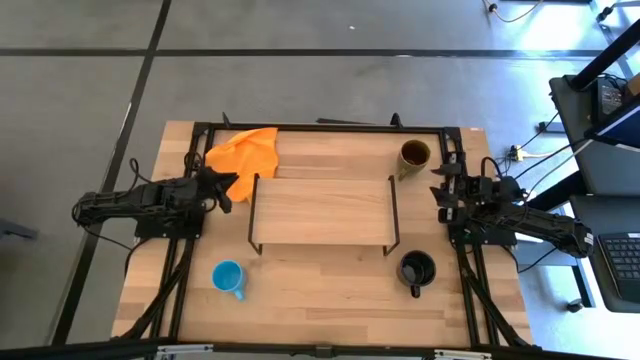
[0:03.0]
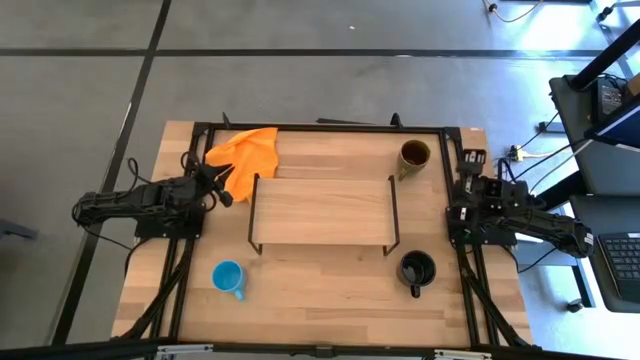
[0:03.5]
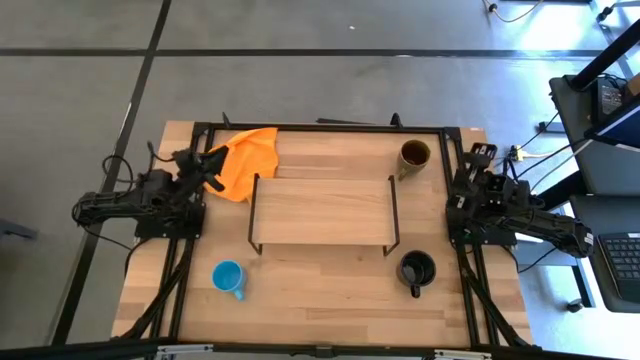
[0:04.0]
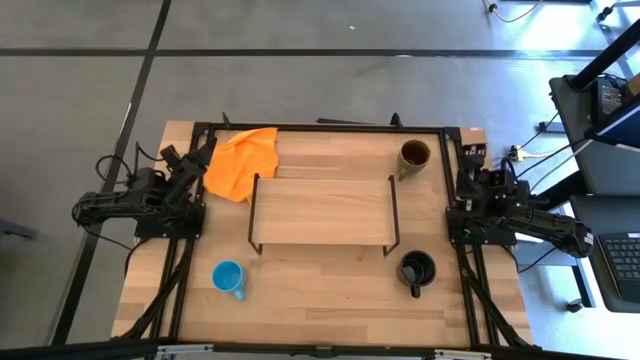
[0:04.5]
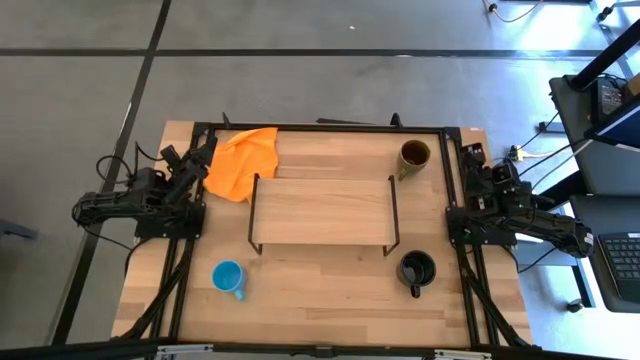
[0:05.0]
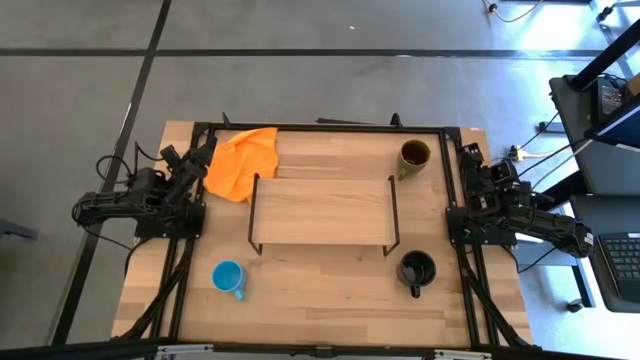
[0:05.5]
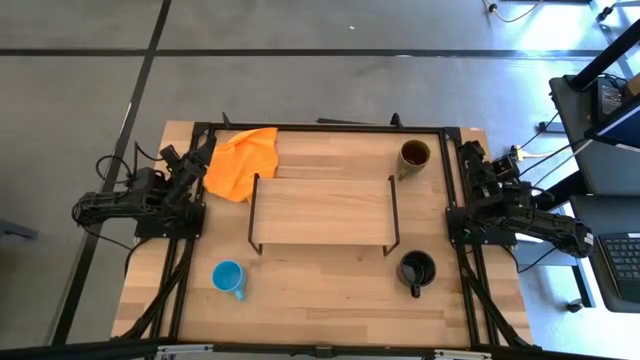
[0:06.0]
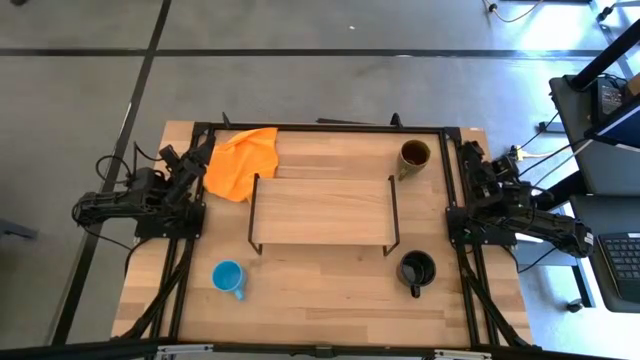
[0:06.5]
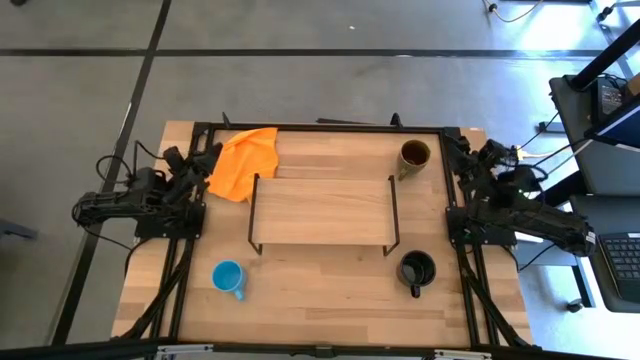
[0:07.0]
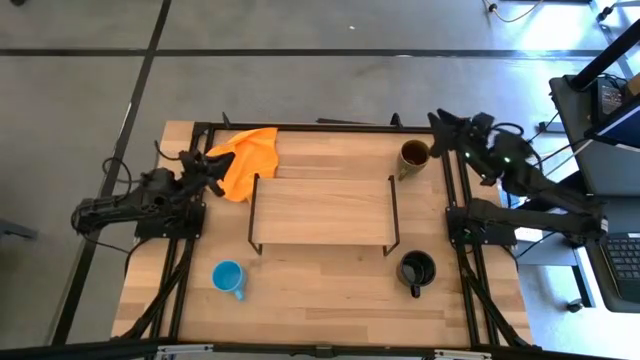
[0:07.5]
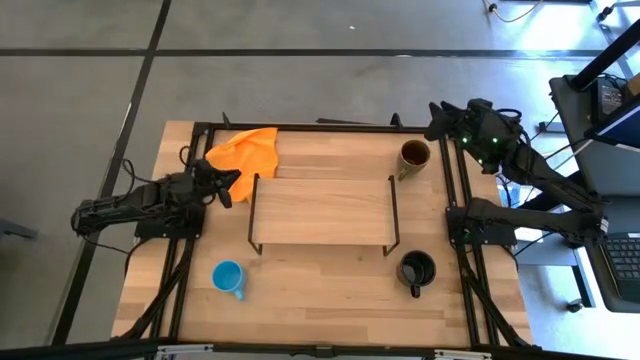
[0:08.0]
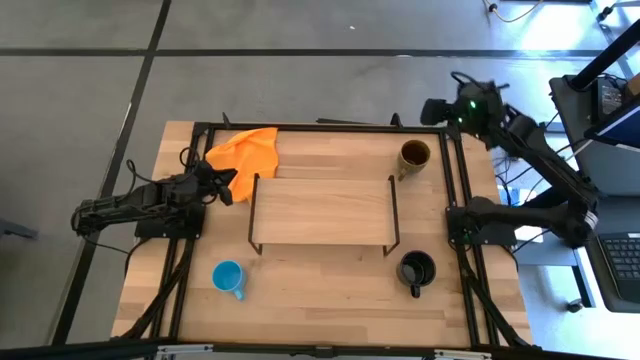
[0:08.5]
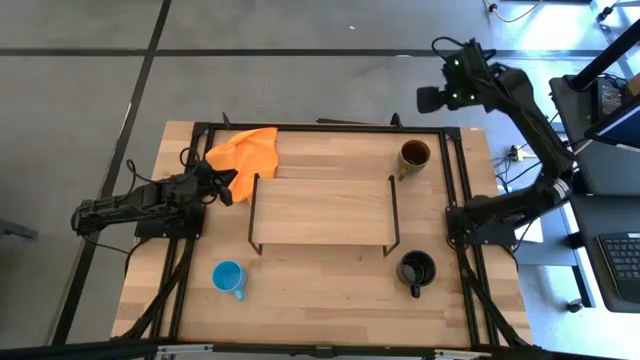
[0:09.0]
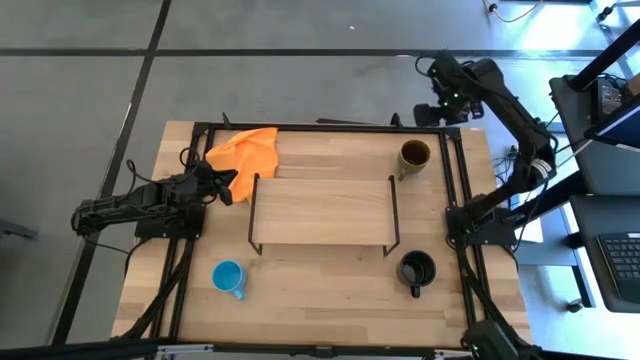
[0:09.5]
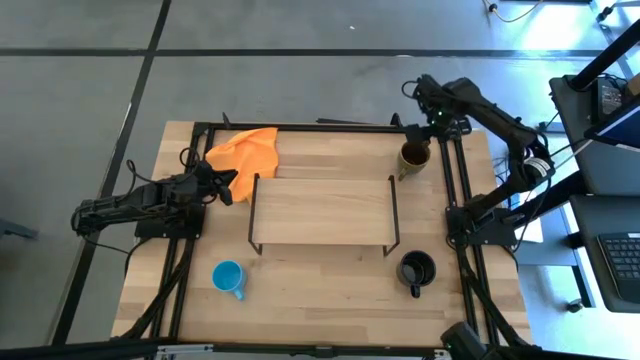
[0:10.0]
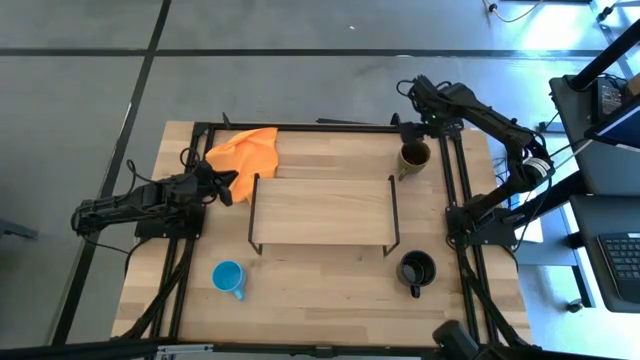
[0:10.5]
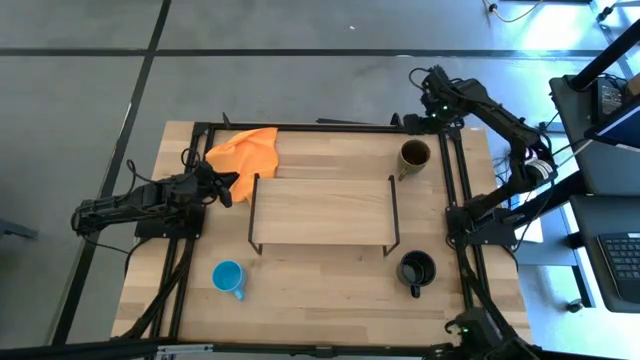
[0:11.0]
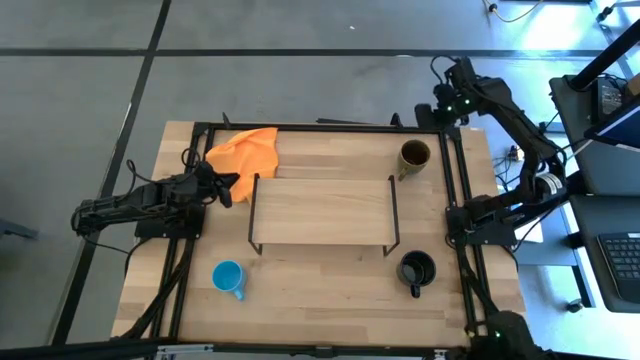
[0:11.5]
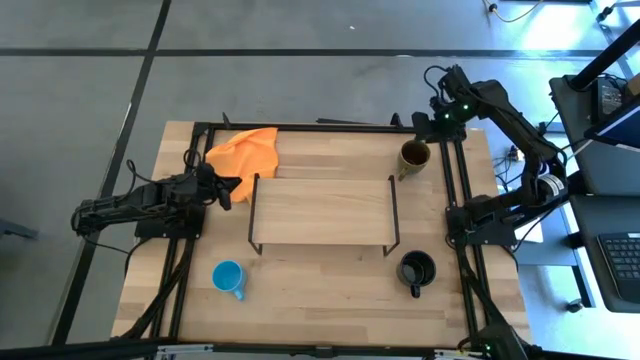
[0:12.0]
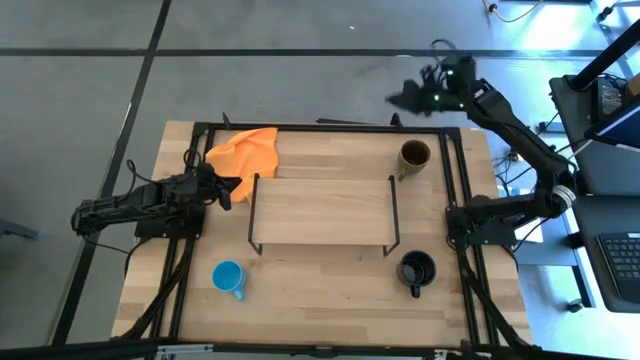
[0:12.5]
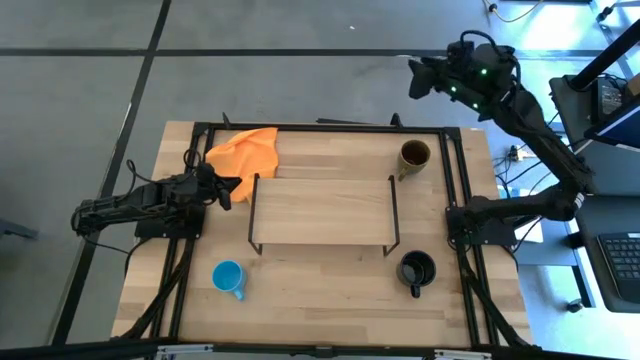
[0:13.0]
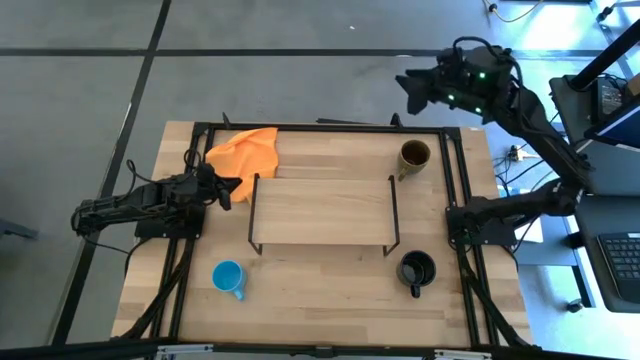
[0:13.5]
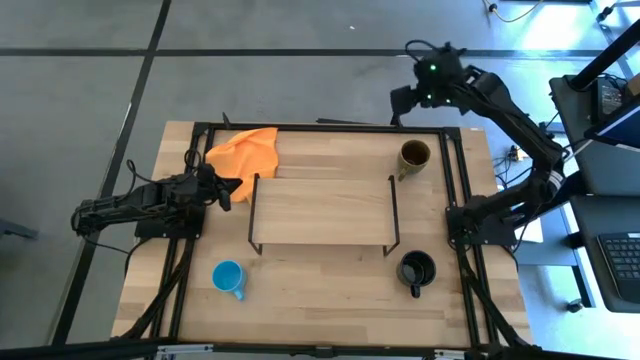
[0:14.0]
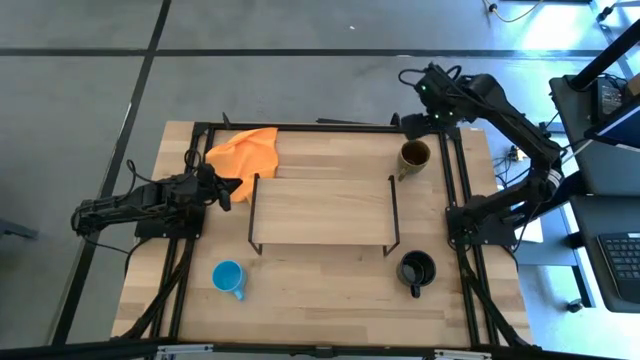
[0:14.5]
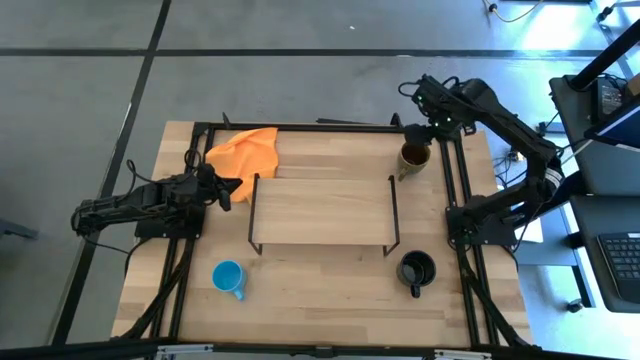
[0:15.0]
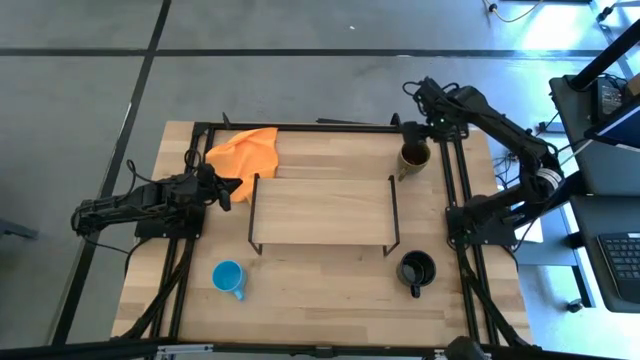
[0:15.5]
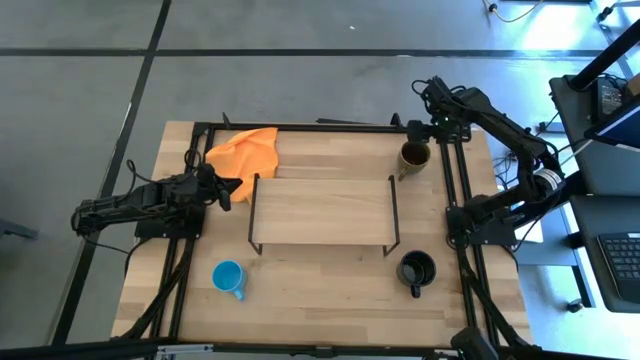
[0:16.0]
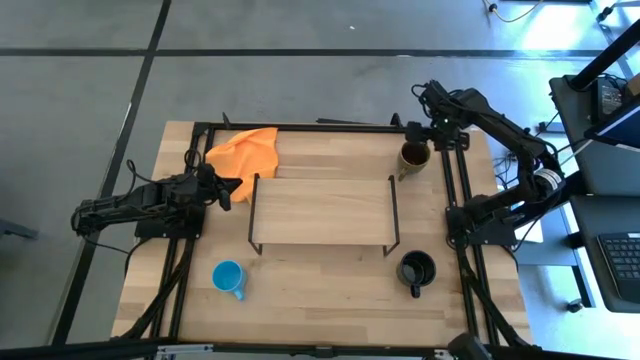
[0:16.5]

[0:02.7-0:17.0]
Task: Stack small to large cups/mugs on shelf
Put the brown mug on the shelf

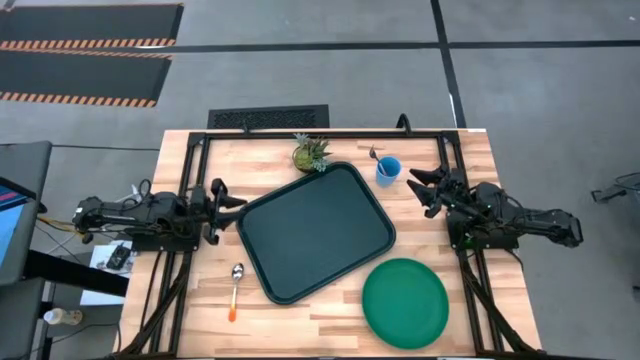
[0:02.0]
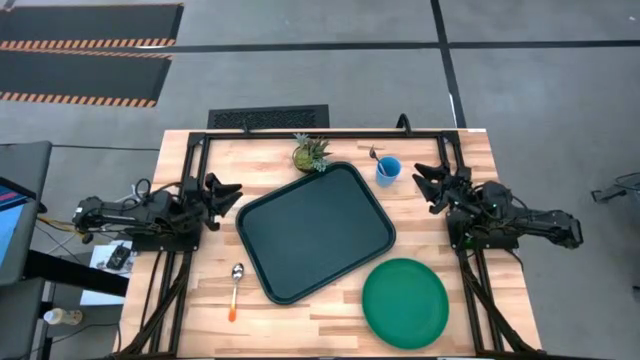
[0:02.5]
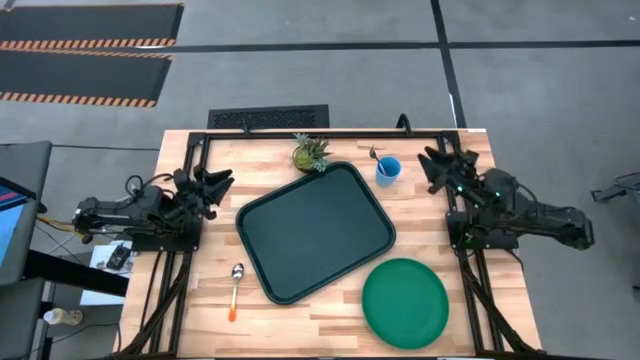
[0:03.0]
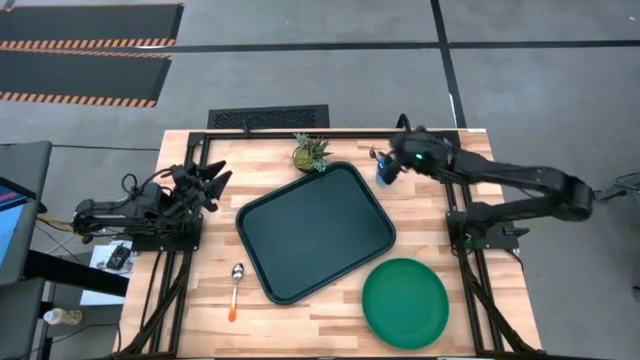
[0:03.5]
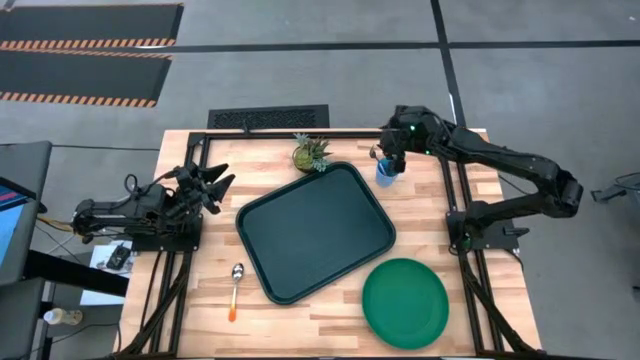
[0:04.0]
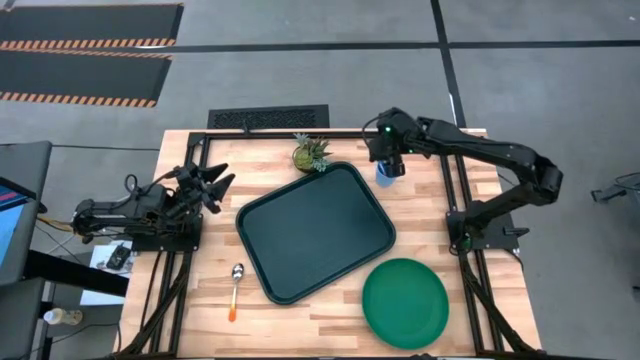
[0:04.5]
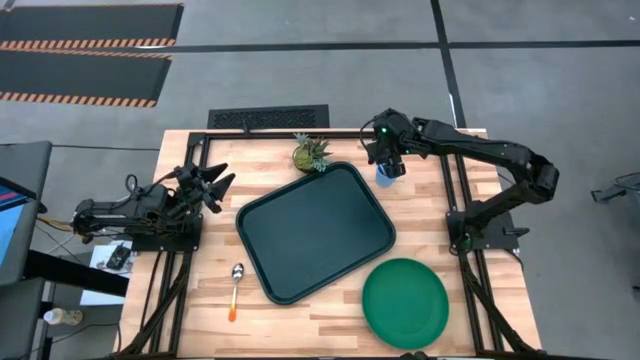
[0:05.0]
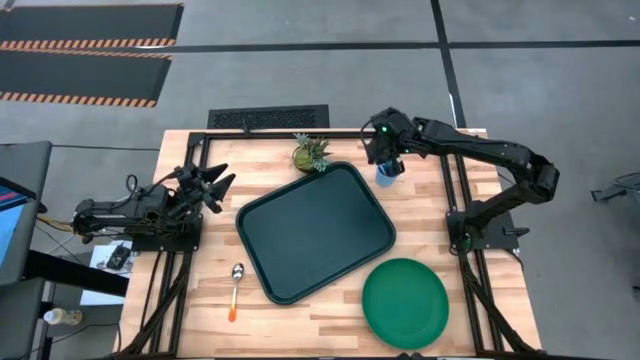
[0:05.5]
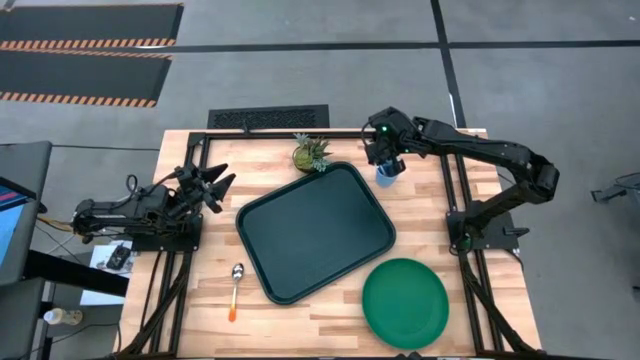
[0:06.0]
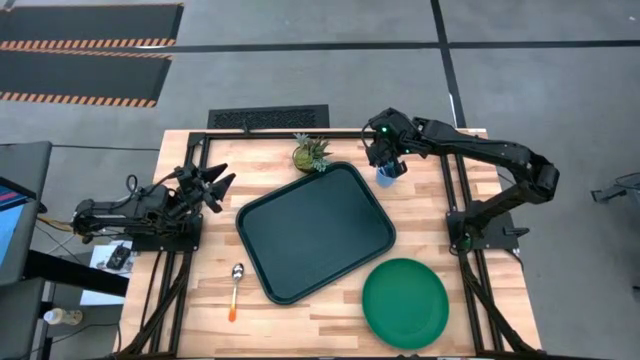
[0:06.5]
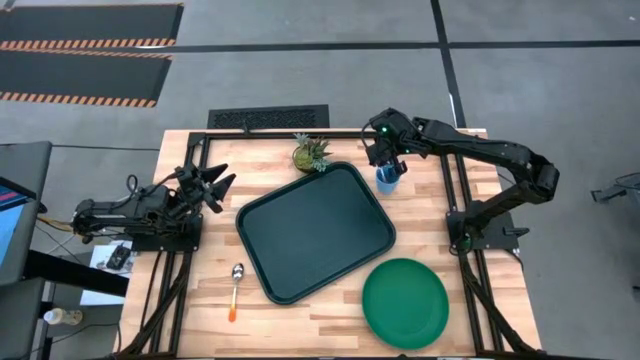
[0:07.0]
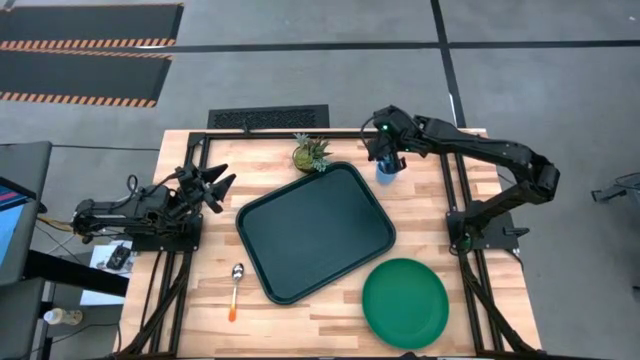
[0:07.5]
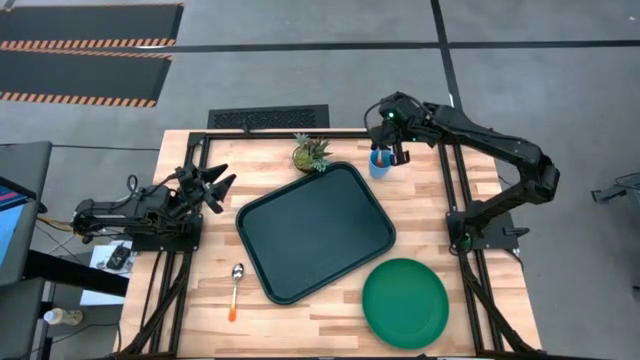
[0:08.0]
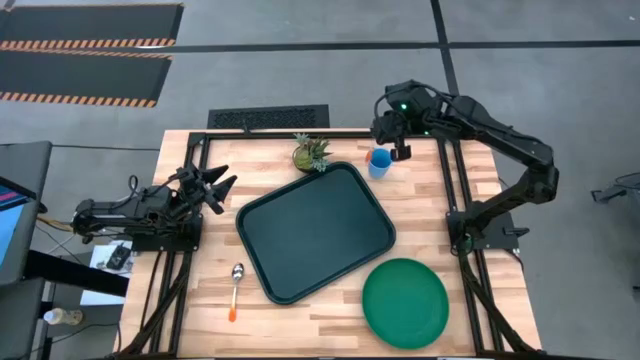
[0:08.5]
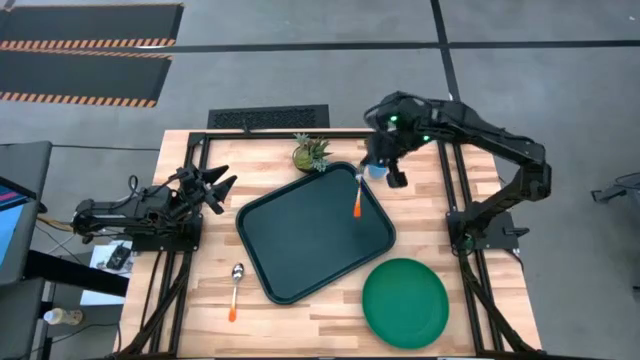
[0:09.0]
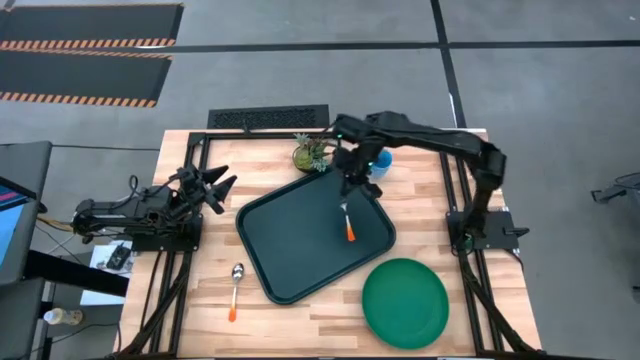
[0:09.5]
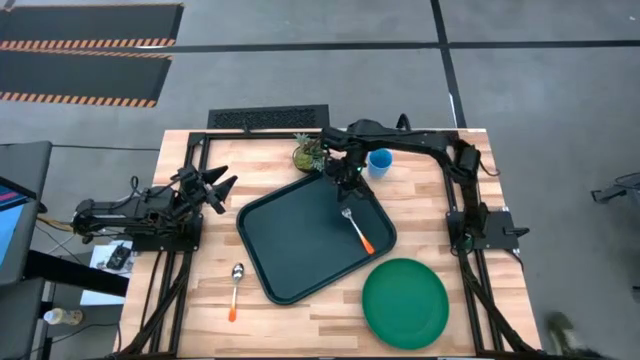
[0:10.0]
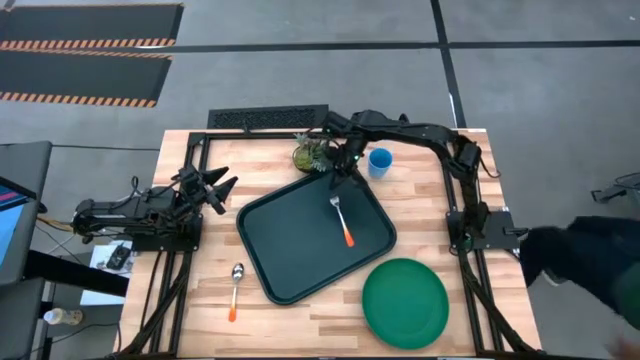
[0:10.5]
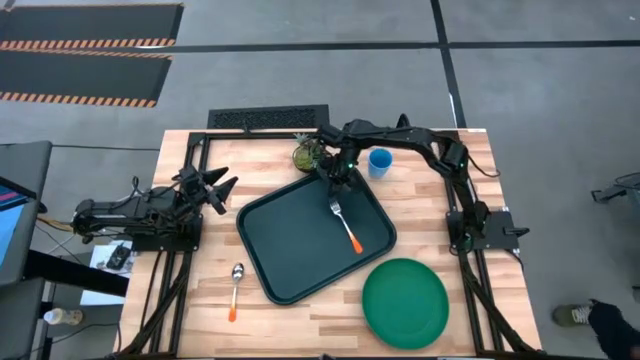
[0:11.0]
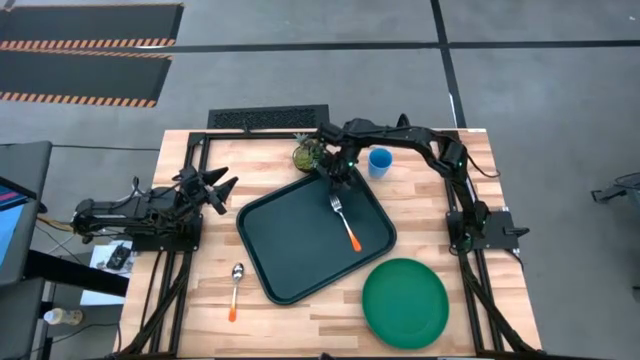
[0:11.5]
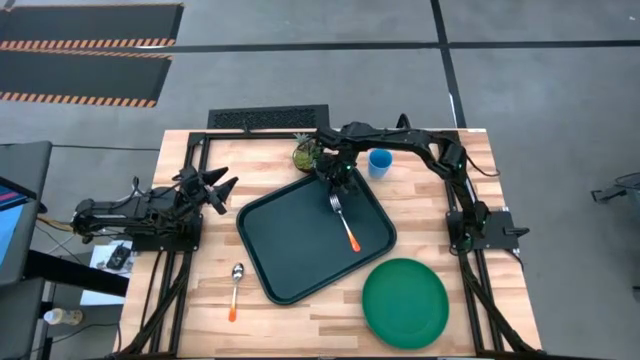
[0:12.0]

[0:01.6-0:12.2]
Task: Pick and place plate/cup/fork/spoon on tray
Put the orange fork on the black serving tray
